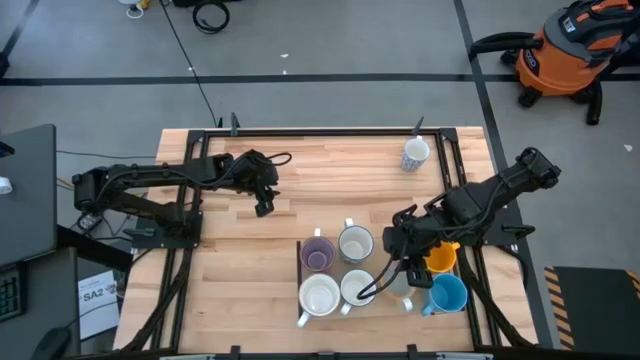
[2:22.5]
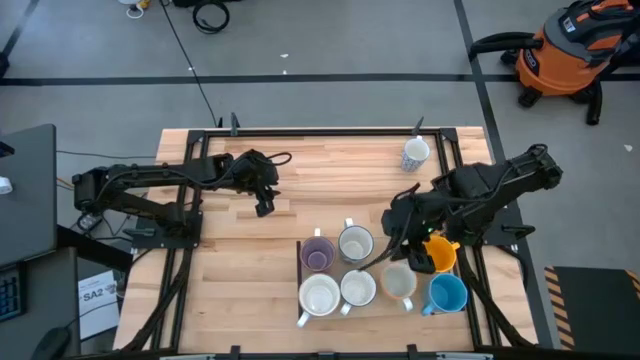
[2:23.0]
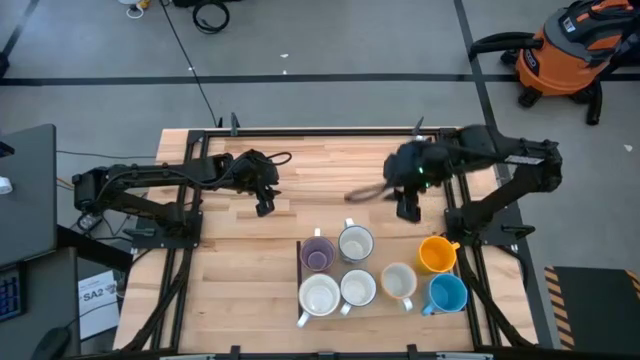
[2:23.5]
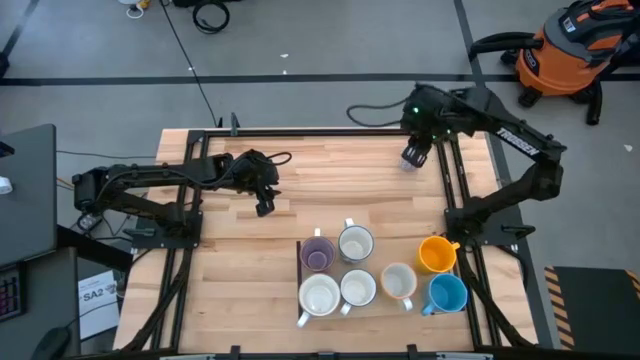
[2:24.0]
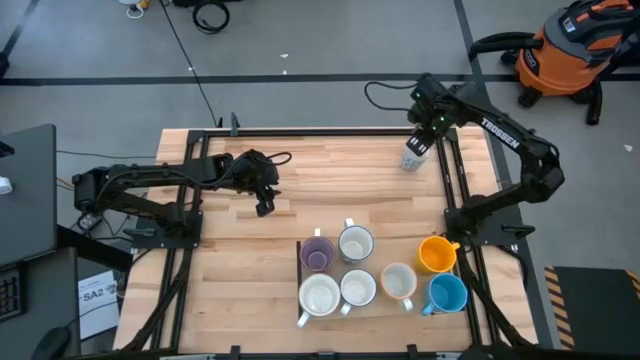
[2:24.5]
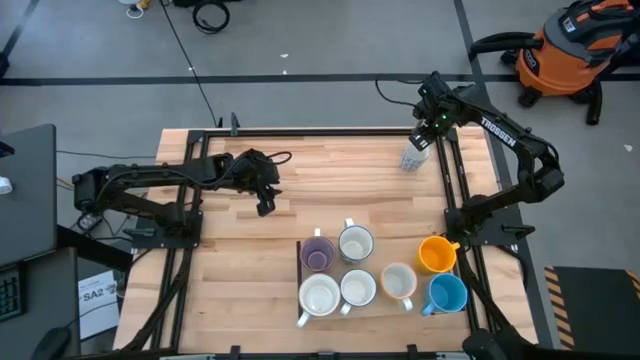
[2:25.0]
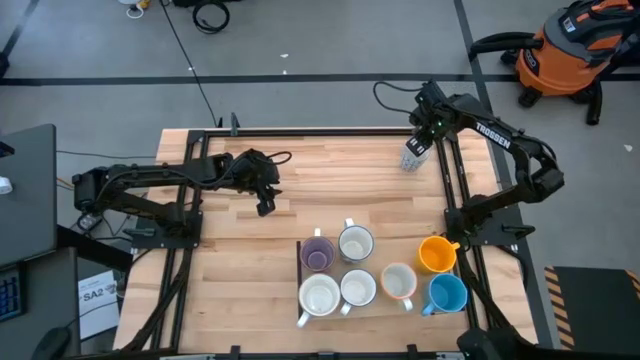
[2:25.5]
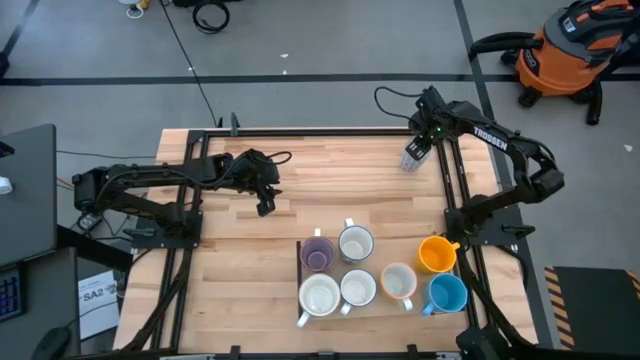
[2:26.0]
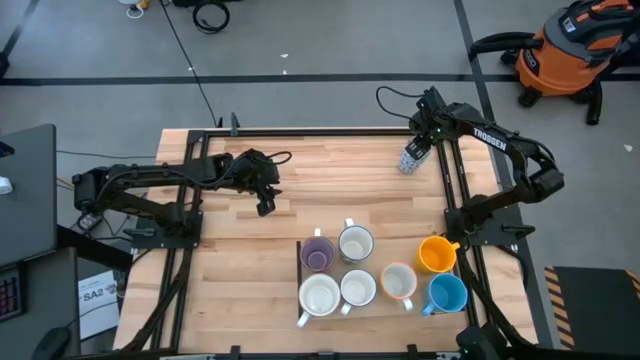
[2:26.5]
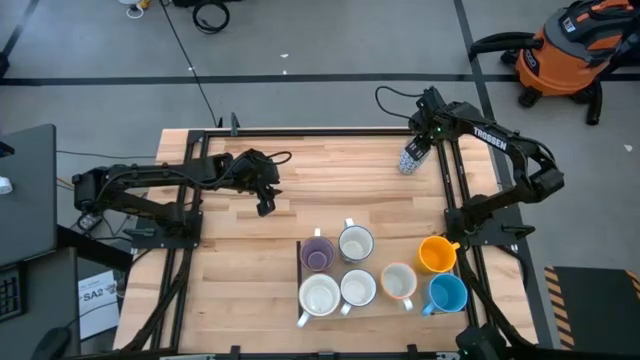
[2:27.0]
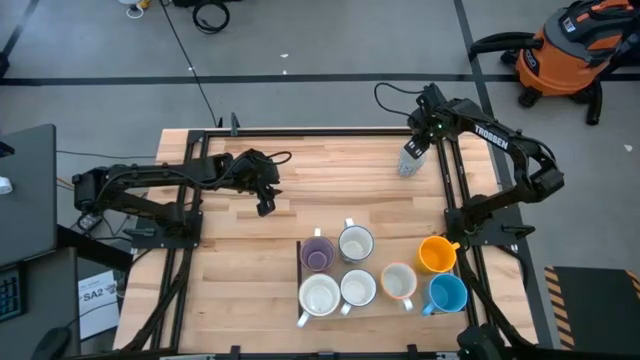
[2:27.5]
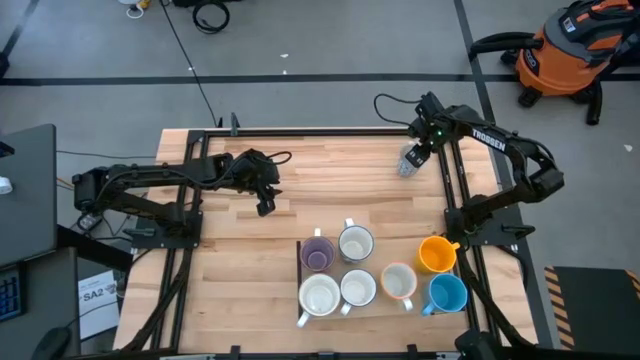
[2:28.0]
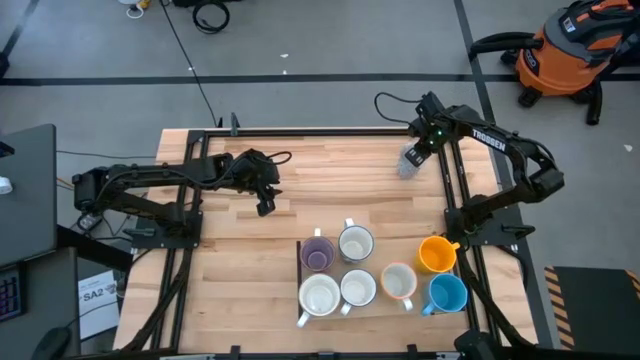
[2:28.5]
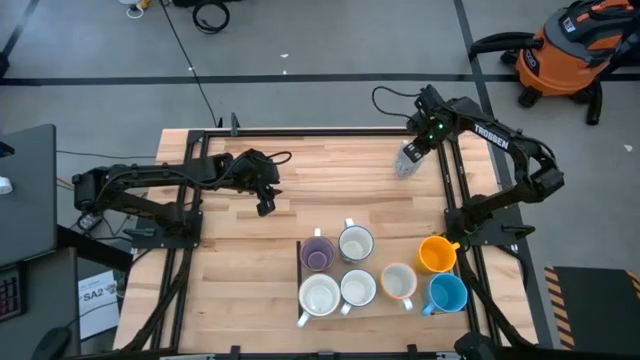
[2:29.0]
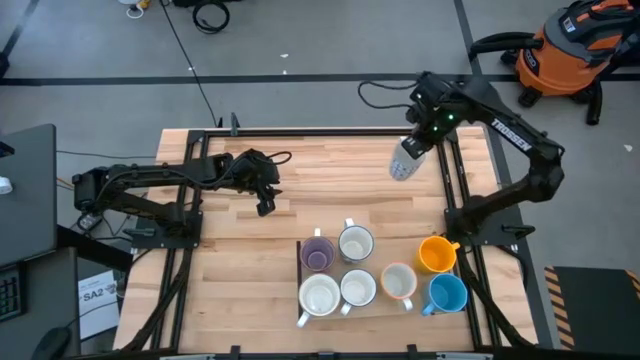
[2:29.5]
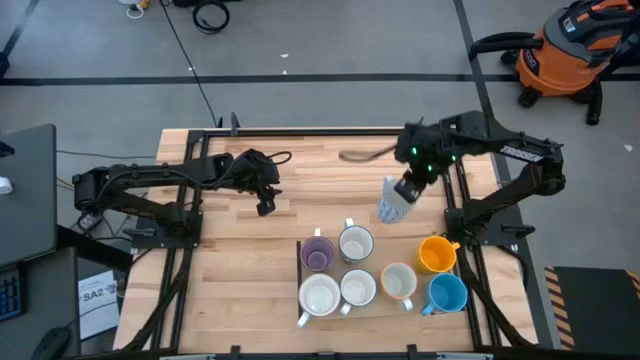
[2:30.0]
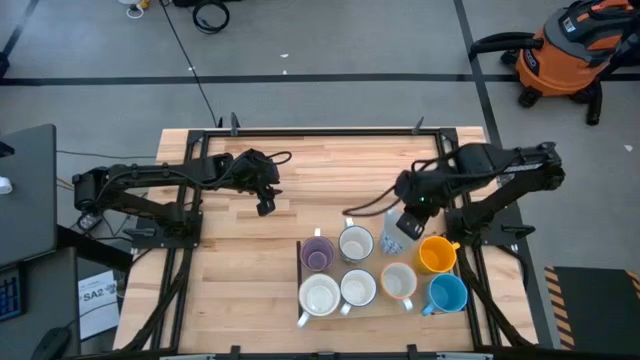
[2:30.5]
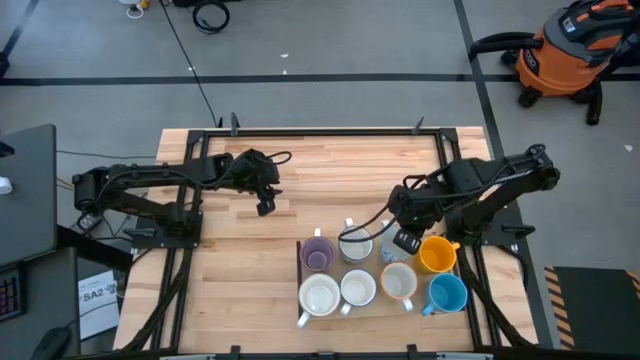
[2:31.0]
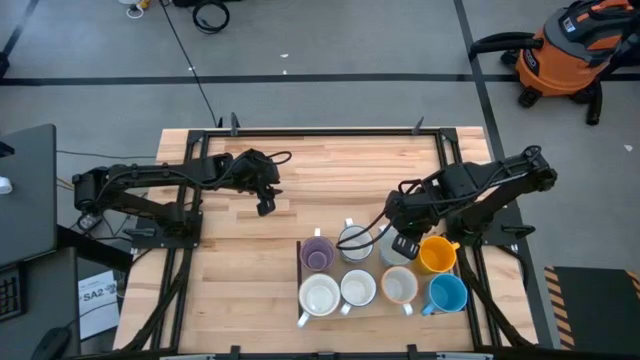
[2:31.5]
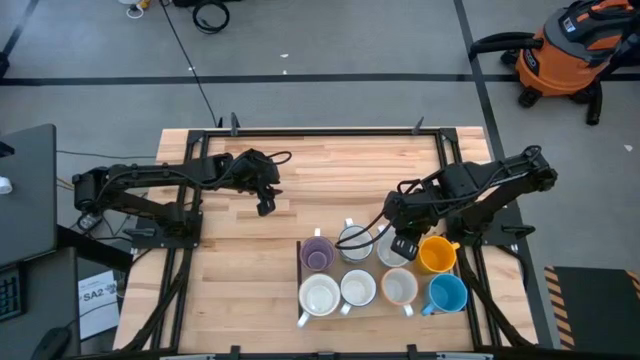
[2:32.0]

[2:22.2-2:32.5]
Task: Place coffee mugs
Put the white blue patterned mug on the shelf

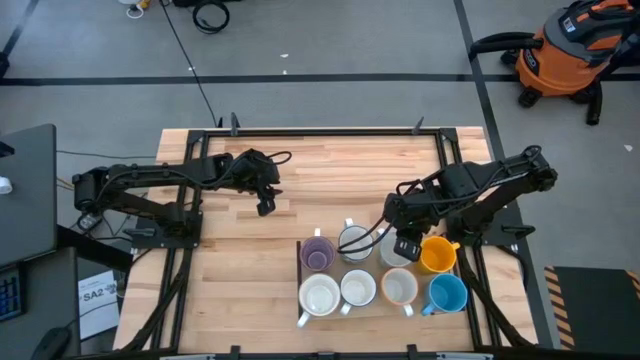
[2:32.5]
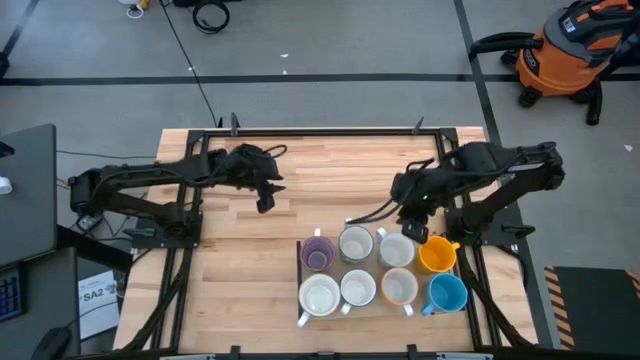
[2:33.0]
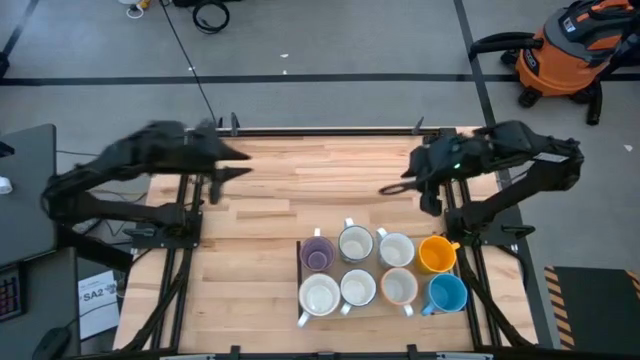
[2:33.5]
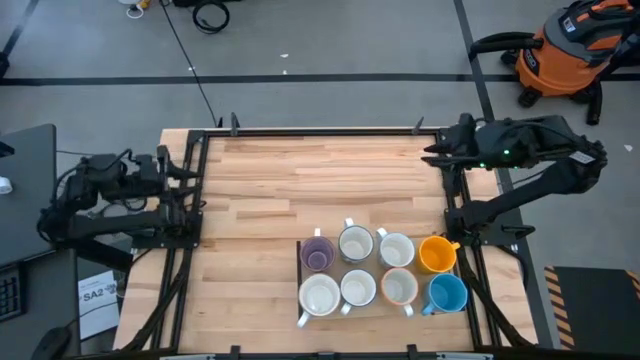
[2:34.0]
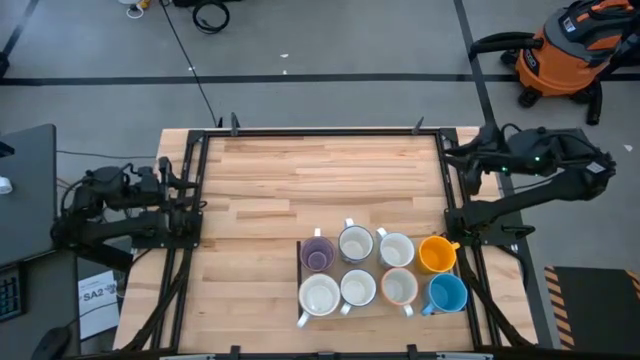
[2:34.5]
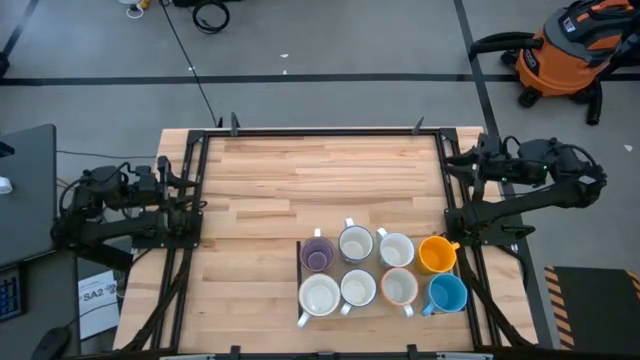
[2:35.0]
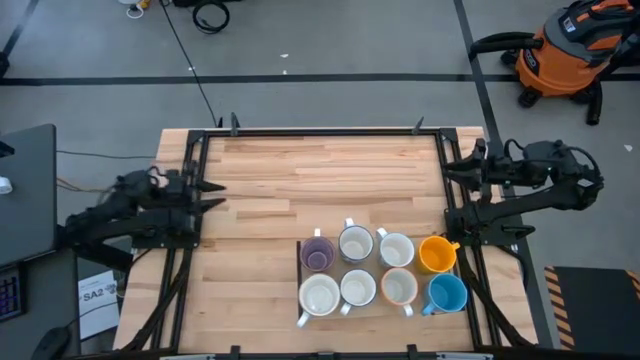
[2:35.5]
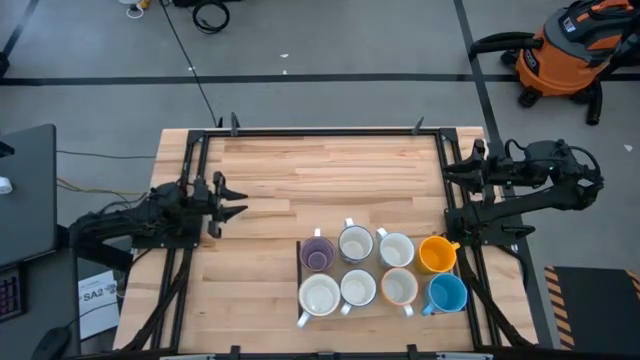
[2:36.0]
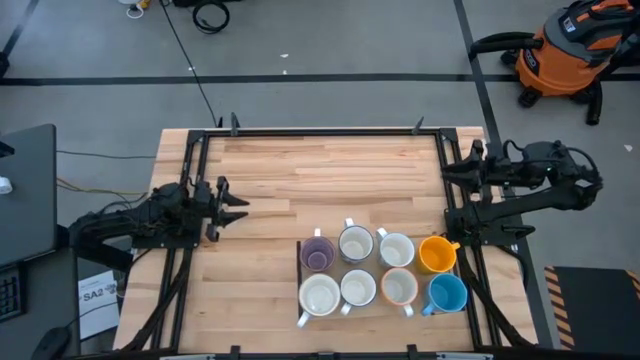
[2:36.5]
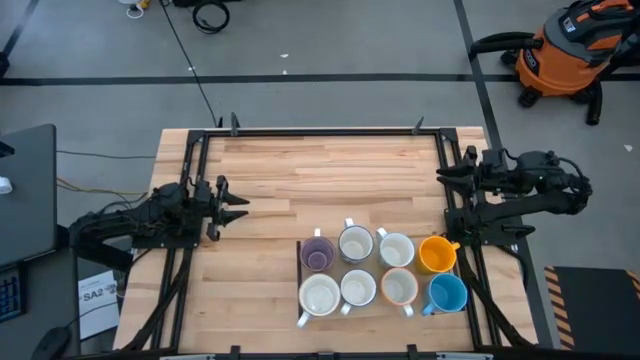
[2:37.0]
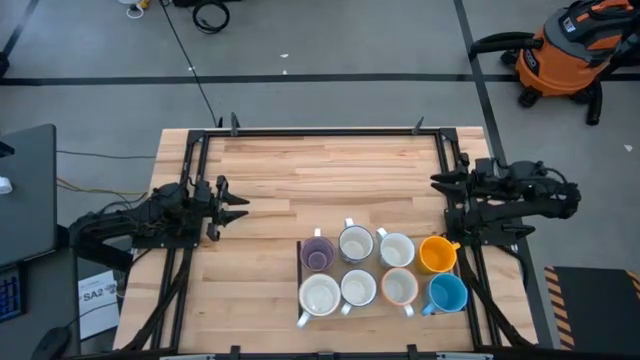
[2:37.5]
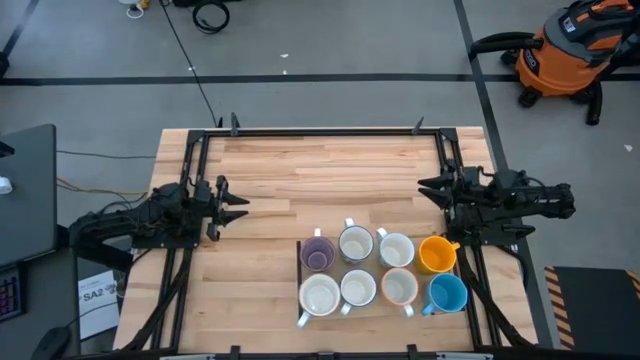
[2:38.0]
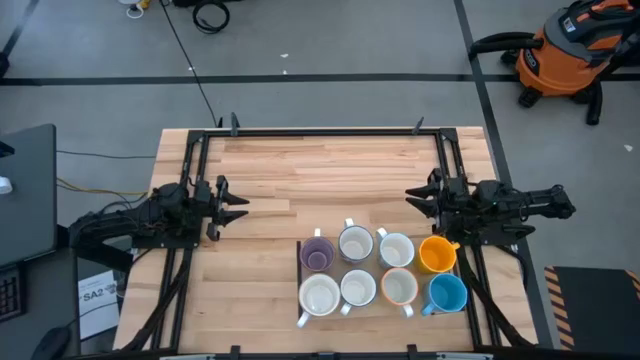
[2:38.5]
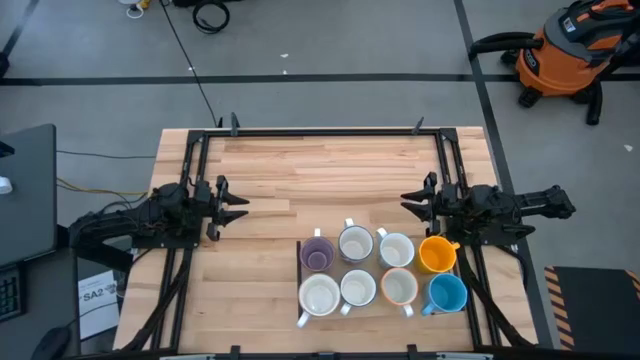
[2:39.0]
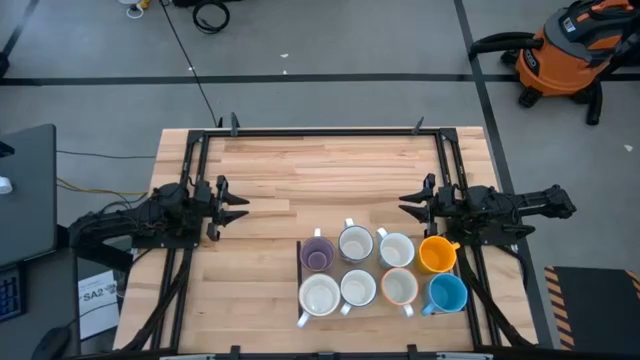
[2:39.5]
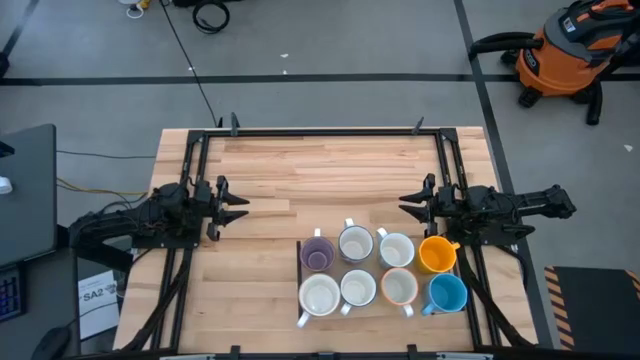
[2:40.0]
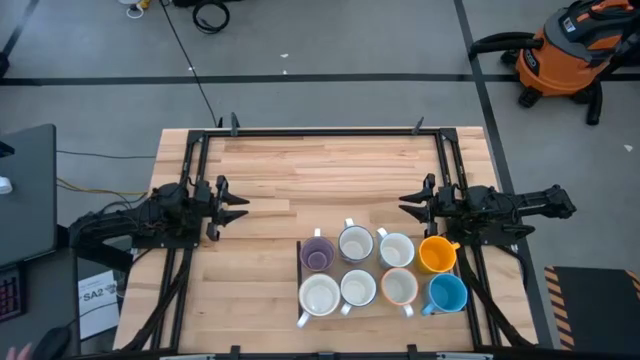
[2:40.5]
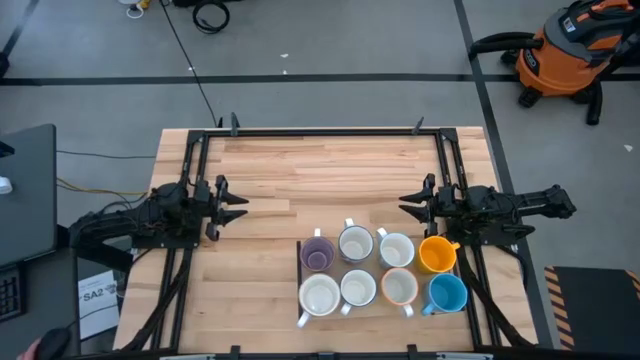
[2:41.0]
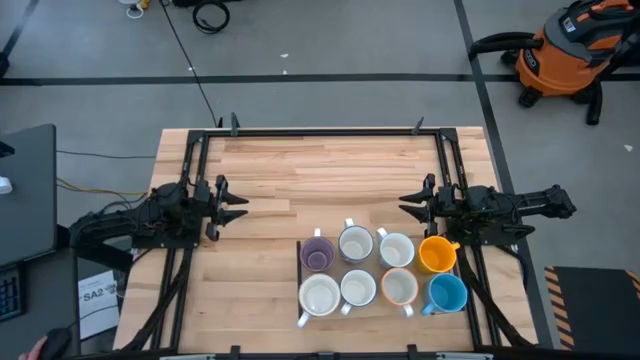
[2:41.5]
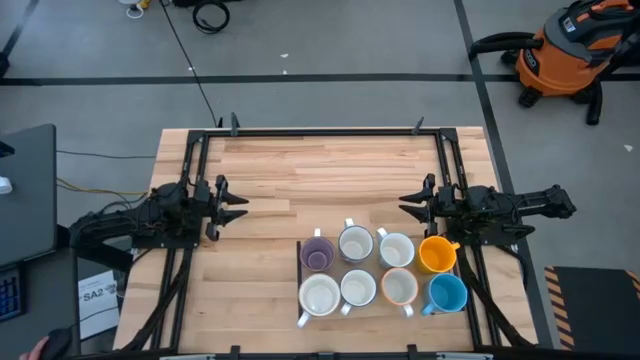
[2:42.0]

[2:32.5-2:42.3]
Return to Home Position

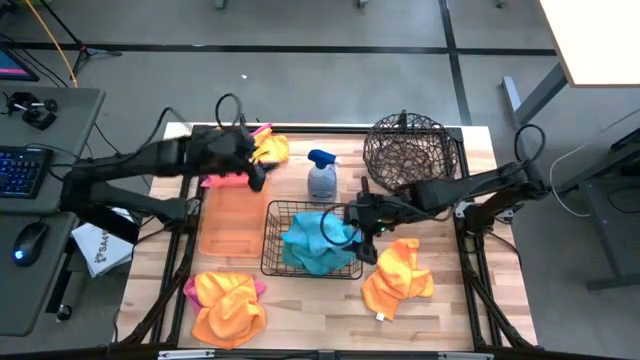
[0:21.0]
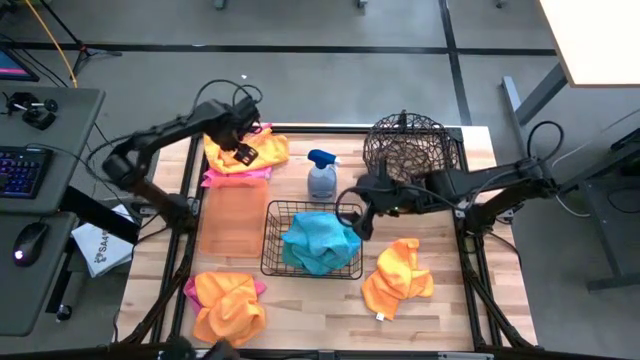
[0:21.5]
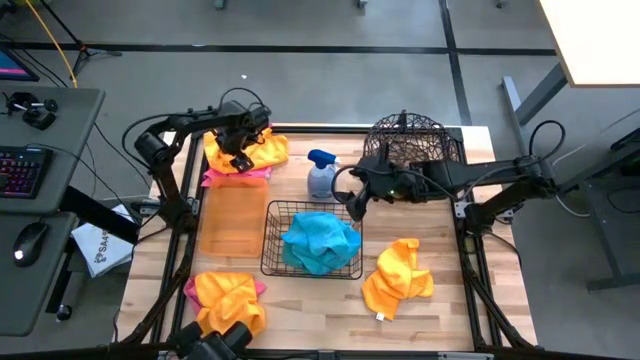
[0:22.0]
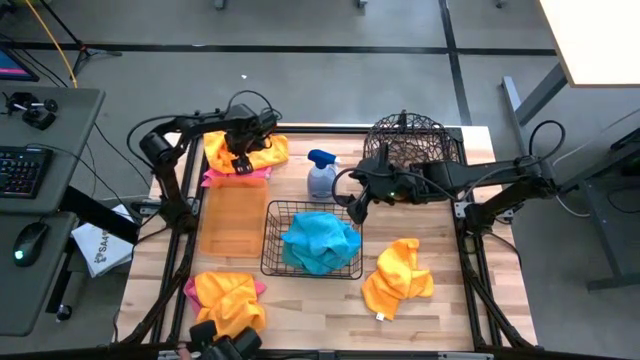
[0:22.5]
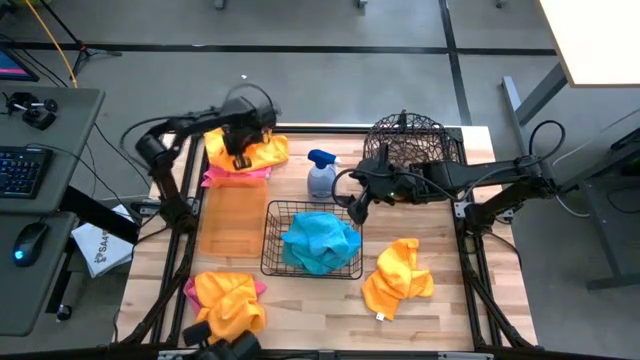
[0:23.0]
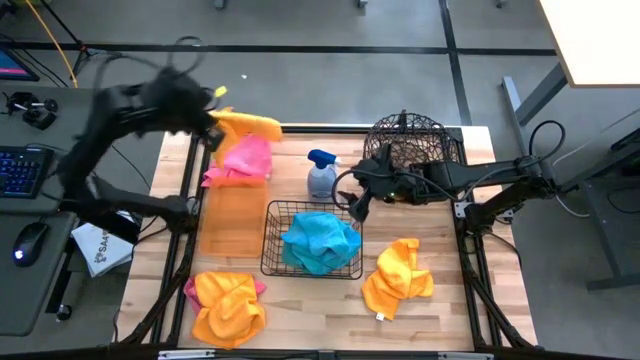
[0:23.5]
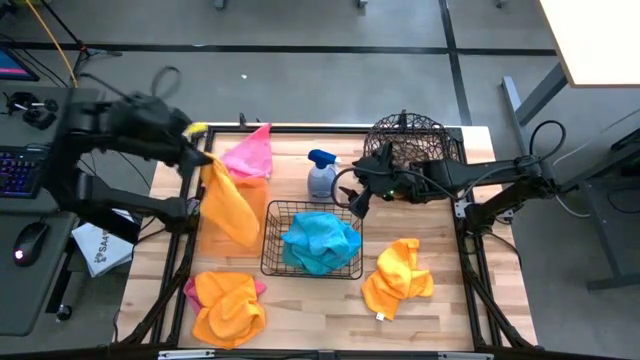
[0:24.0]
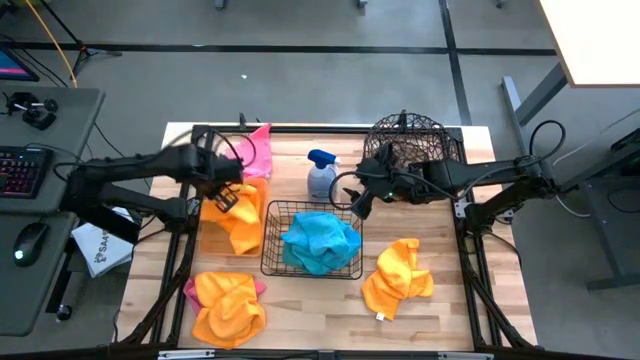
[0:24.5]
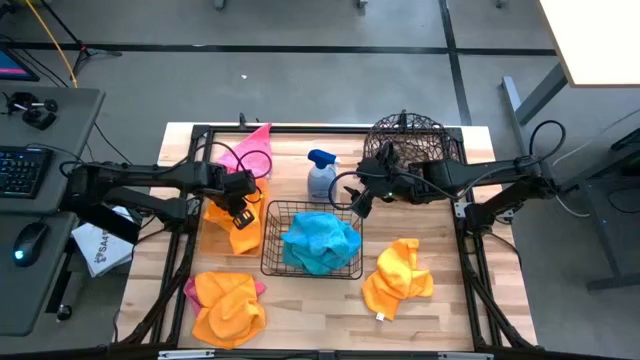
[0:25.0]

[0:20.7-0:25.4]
Task: Sort microfiber towel by color & place in baskets
Put the top yellow towel into the orange bin
